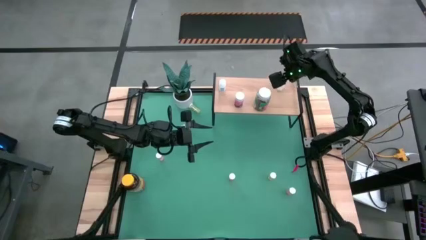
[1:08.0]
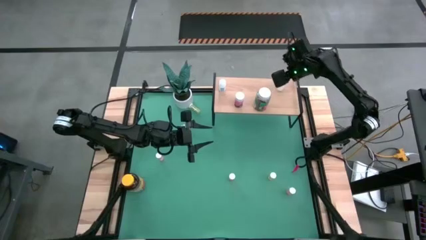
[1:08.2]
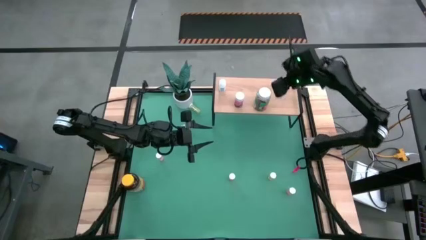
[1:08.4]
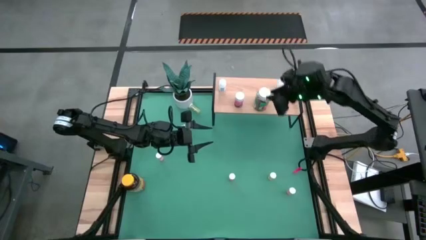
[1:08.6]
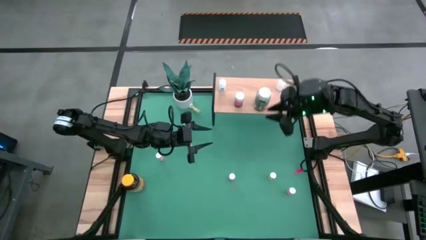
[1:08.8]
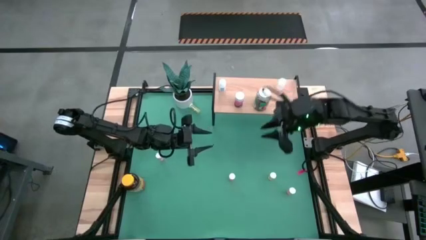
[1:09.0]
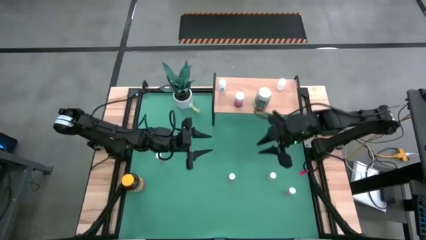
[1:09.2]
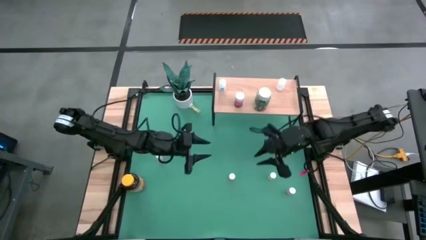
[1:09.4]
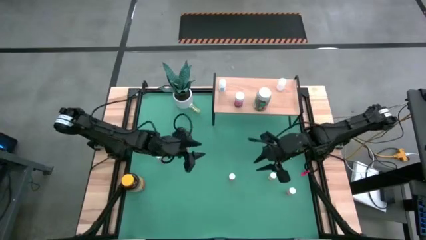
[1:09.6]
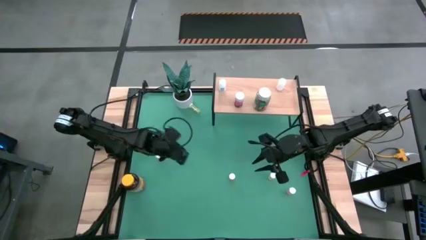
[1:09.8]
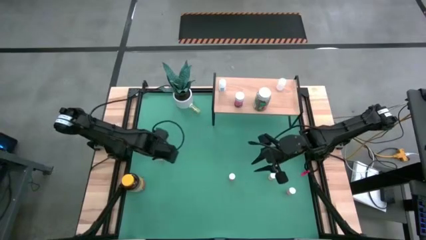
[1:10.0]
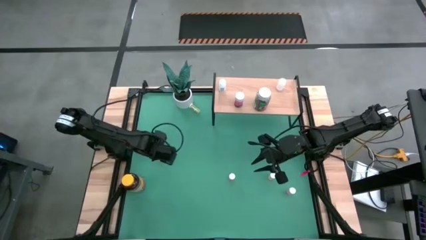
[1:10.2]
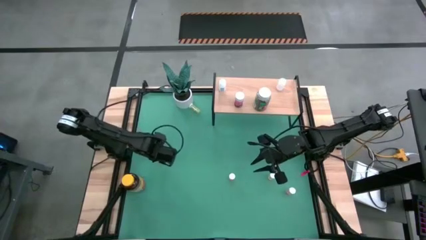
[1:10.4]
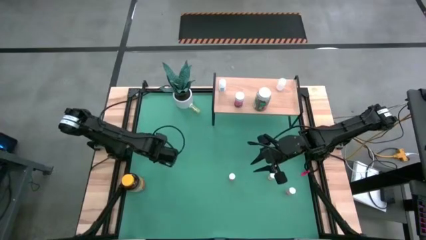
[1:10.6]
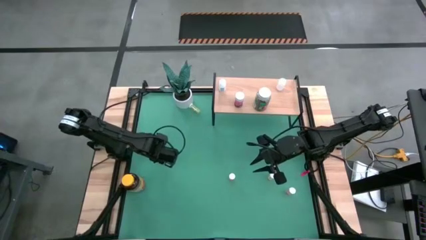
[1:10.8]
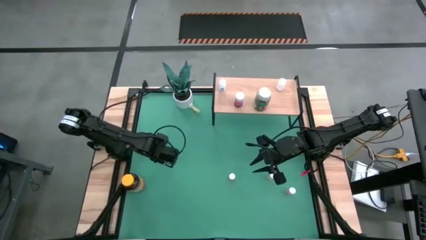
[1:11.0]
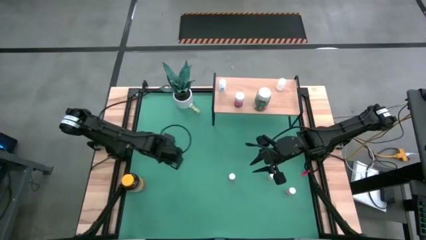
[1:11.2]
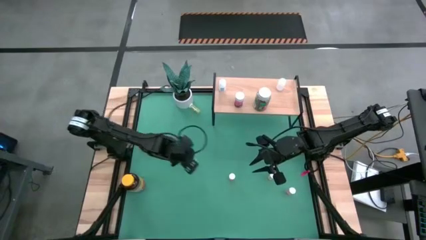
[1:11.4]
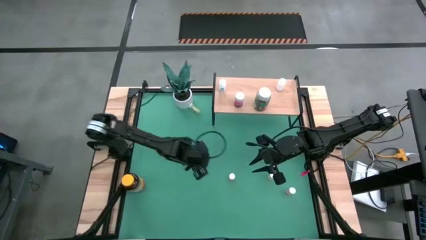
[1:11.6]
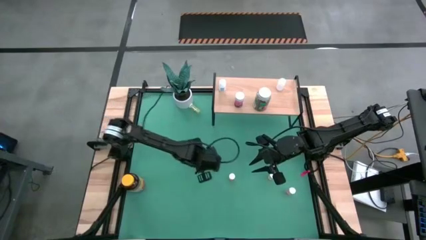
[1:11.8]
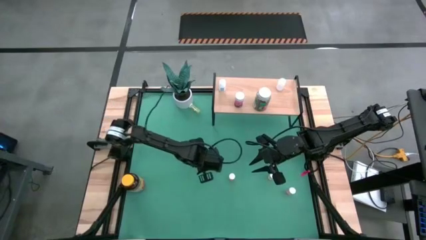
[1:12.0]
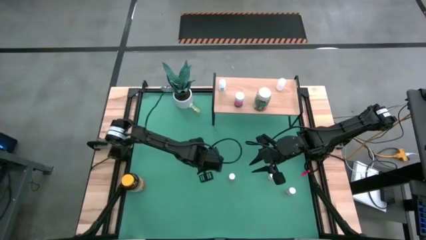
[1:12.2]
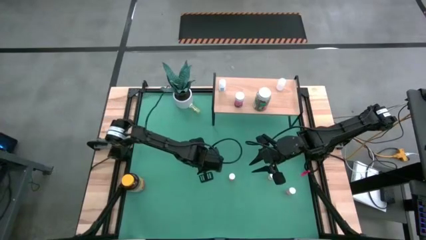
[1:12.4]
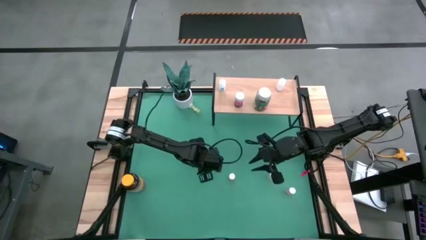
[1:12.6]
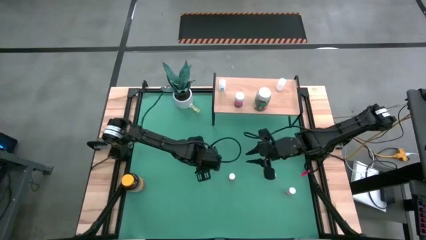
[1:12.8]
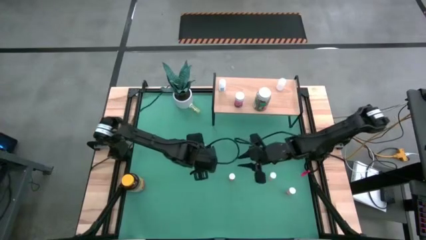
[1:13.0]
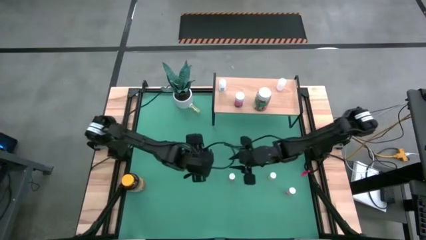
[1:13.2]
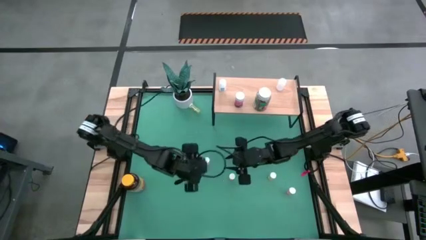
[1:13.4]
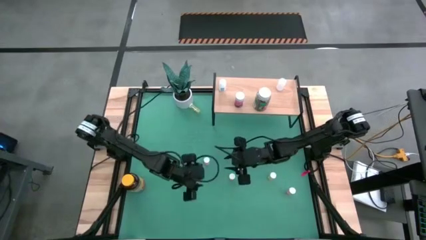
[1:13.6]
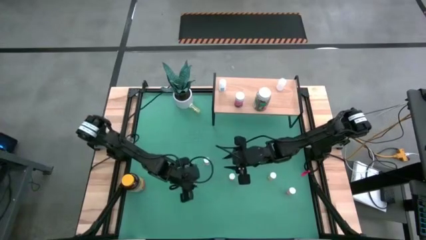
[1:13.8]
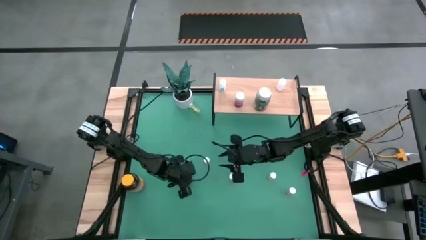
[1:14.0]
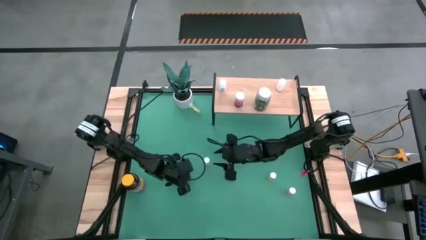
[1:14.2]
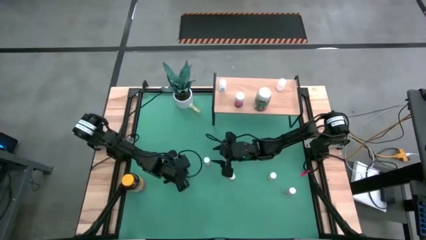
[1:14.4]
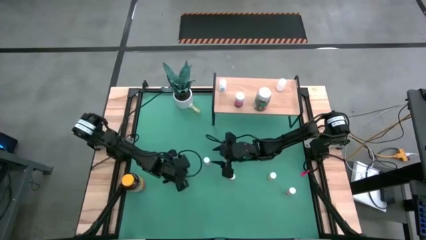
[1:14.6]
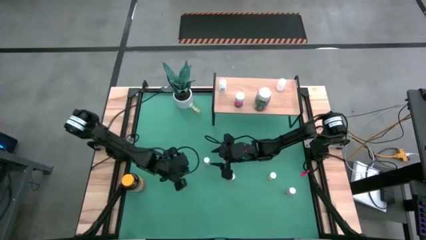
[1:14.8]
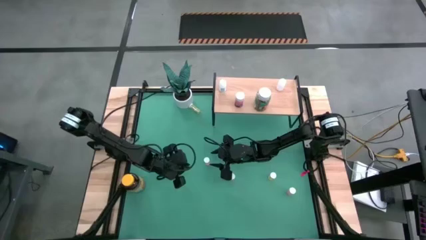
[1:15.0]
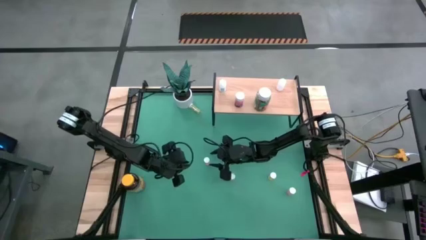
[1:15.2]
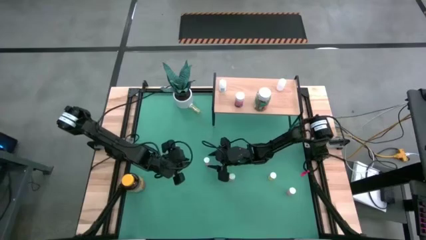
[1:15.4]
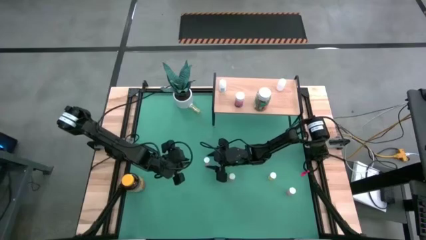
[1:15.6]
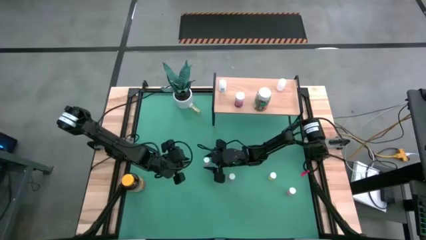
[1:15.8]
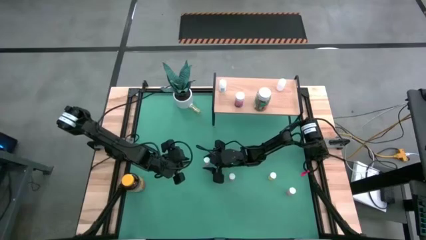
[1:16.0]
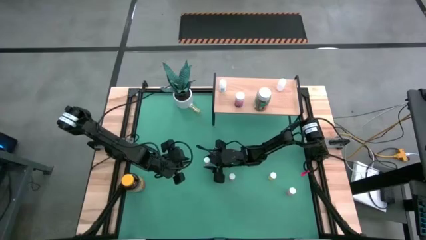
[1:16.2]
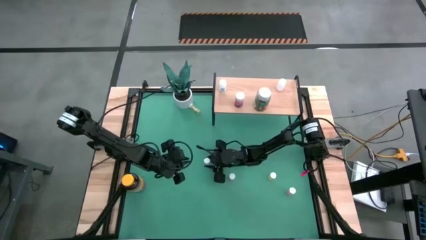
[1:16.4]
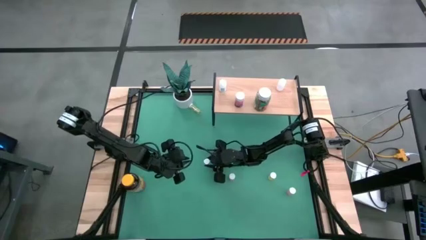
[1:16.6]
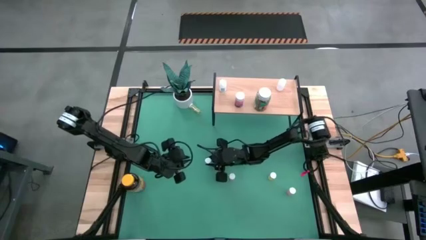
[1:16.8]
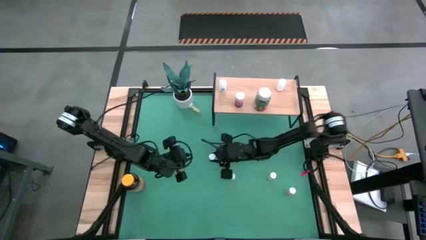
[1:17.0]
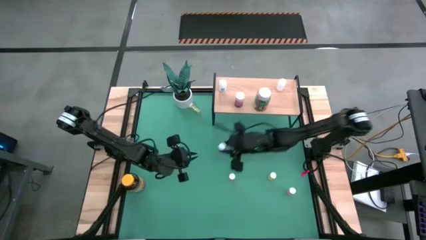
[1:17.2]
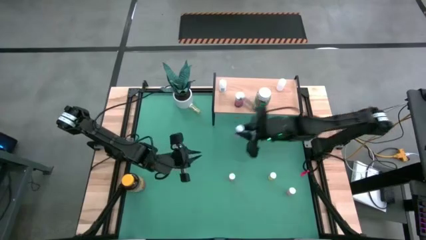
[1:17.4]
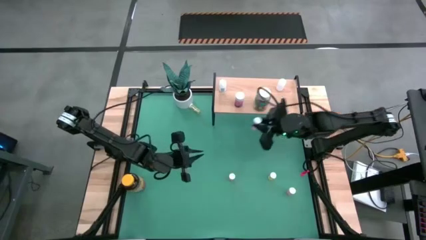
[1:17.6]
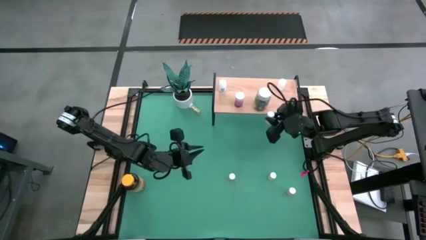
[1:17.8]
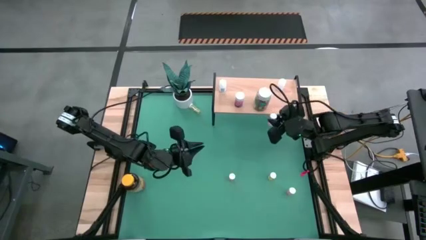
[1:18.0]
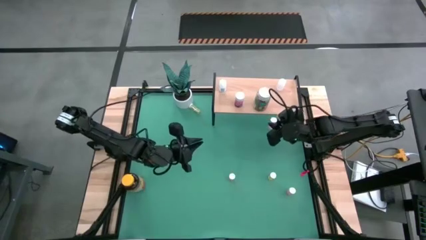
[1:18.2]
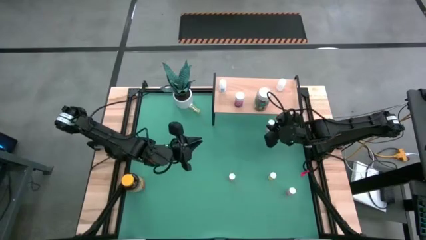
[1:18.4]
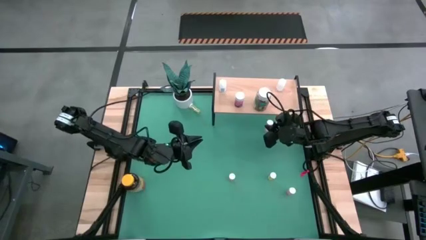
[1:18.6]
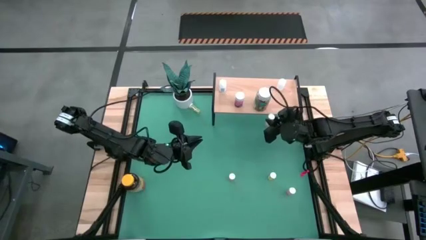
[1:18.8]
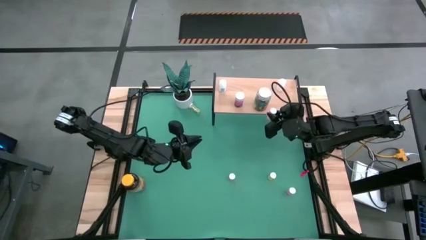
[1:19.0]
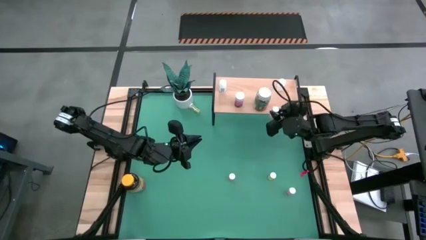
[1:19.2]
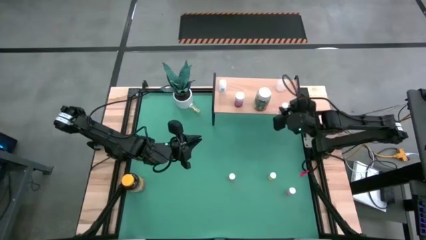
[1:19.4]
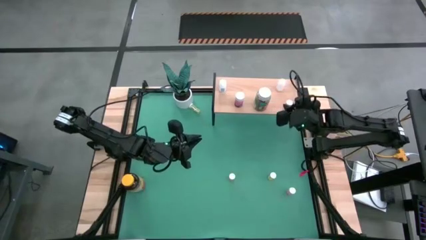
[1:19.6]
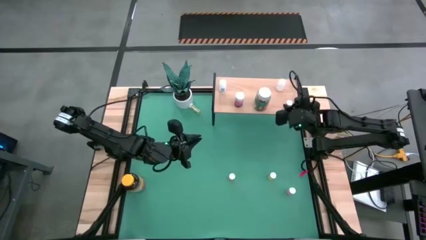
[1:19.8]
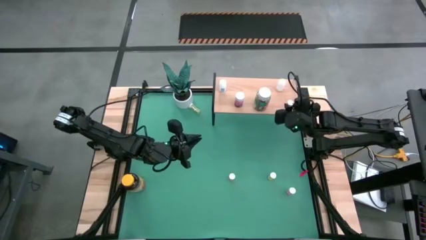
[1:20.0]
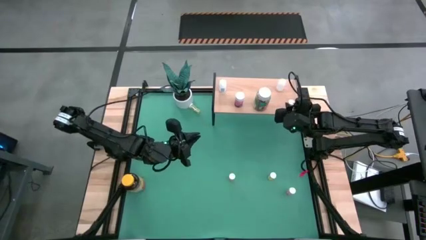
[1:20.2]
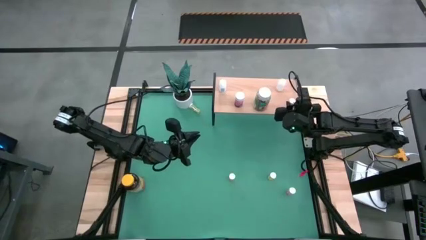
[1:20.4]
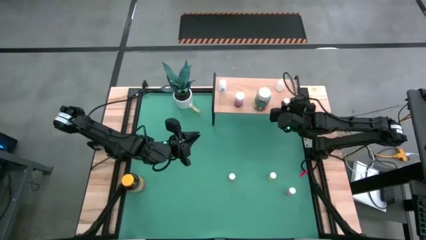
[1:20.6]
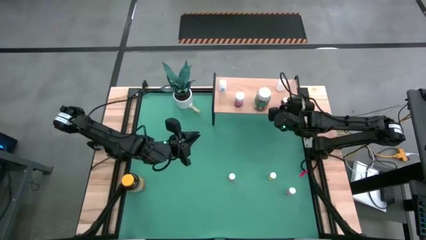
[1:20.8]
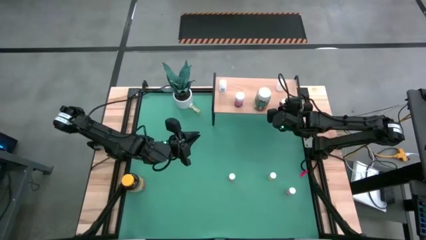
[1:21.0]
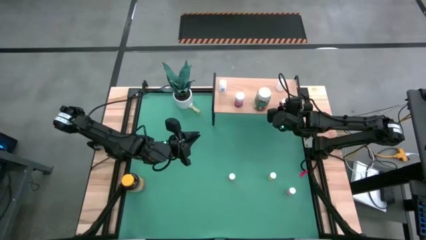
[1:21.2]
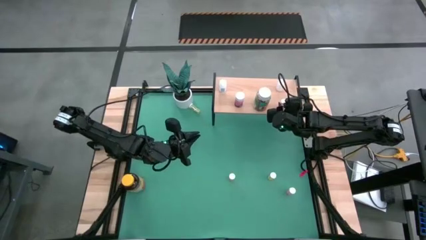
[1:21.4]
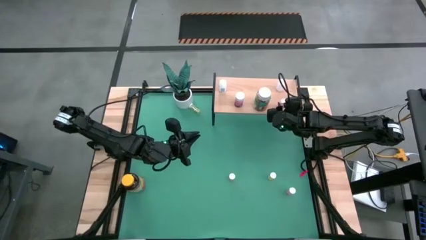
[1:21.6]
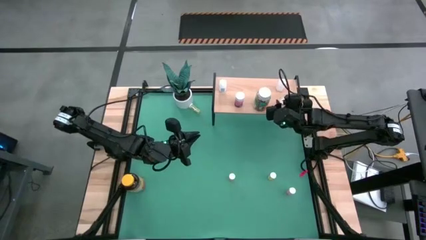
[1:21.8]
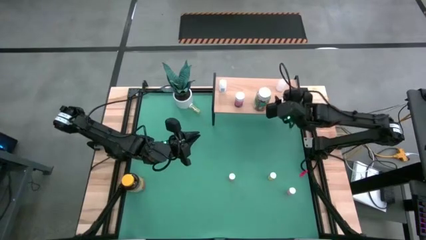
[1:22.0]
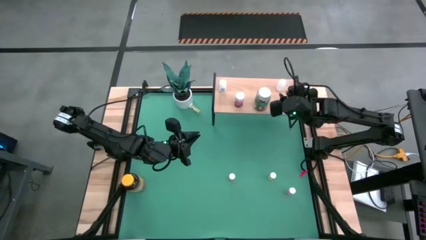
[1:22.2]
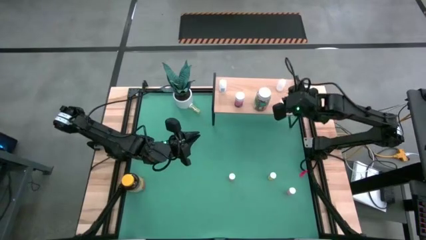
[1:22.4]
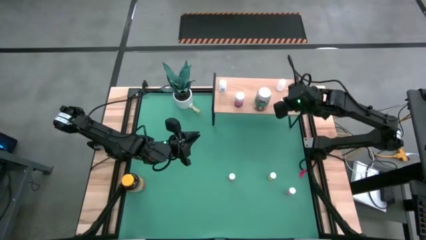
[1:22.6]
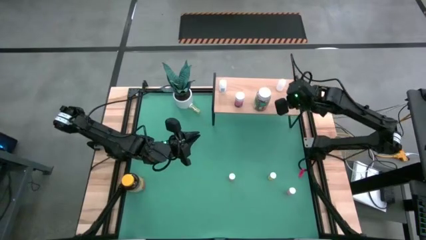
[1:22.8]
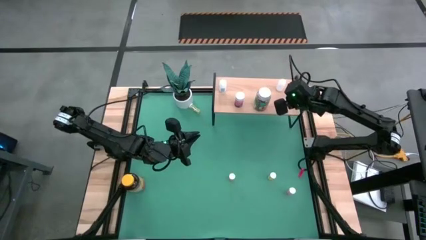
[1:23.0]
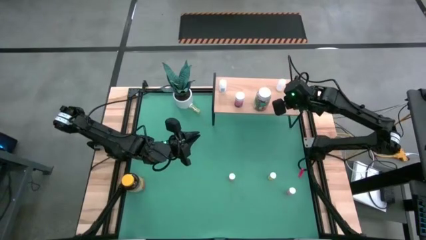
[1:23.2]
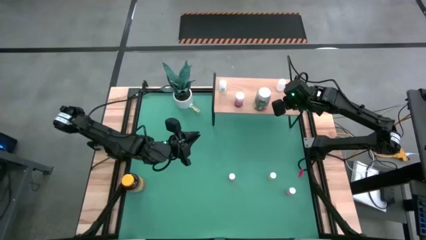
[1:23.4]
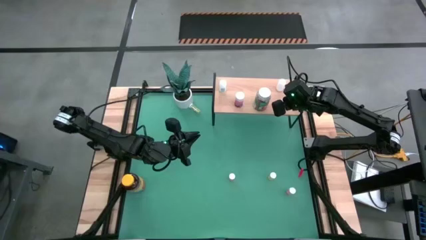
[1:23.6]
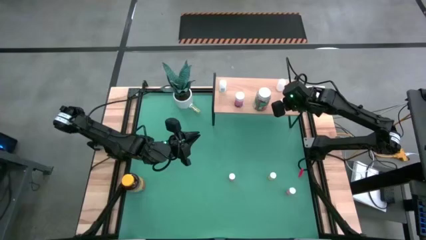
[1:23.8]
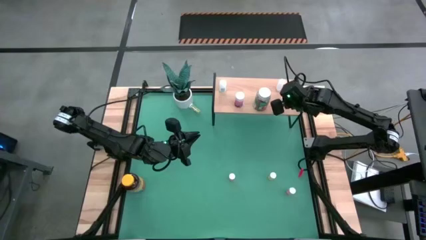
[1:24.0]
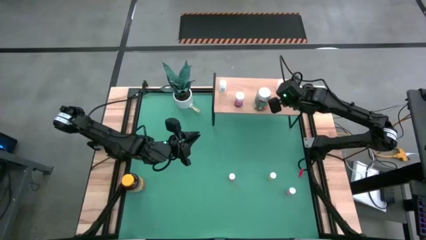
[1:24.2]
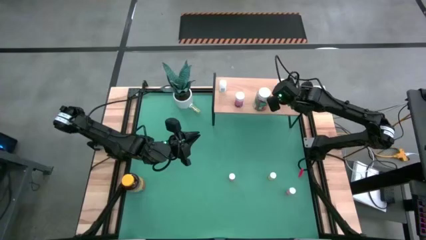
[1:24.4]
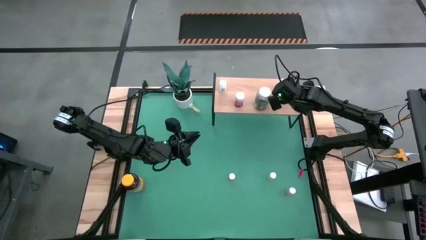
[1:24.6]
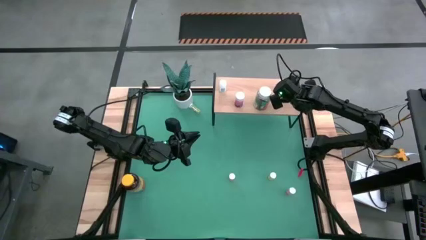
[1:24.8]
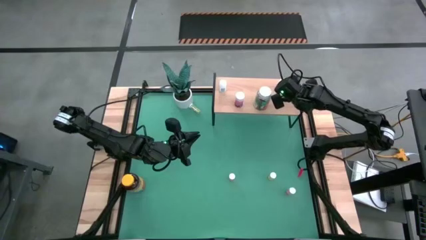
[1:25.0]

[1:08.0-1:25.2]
Task: Pick and place medicine bottles onto shelf by color
Put the left light pink pill bottle on the shelf
